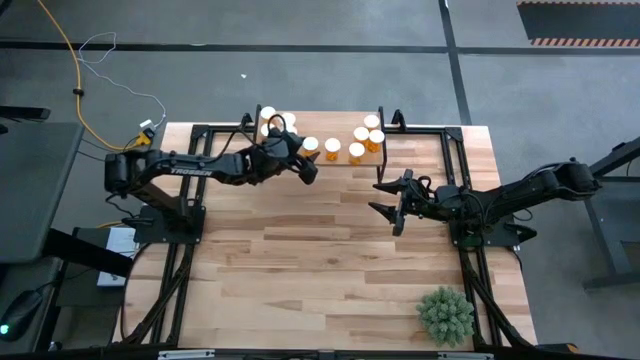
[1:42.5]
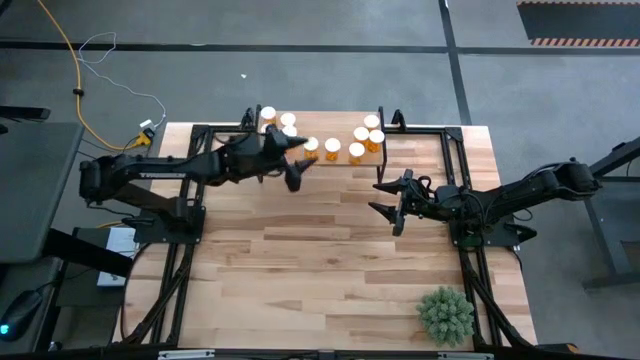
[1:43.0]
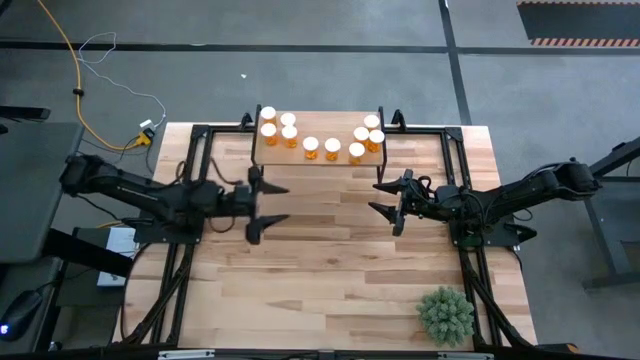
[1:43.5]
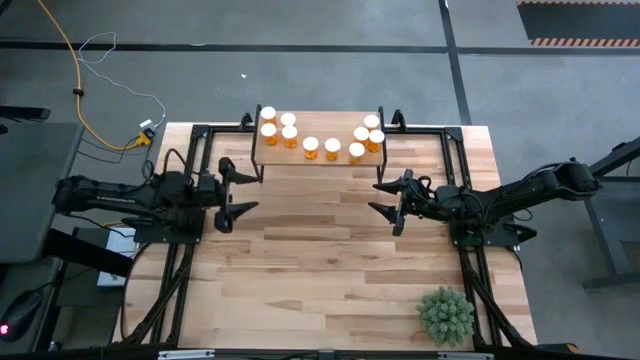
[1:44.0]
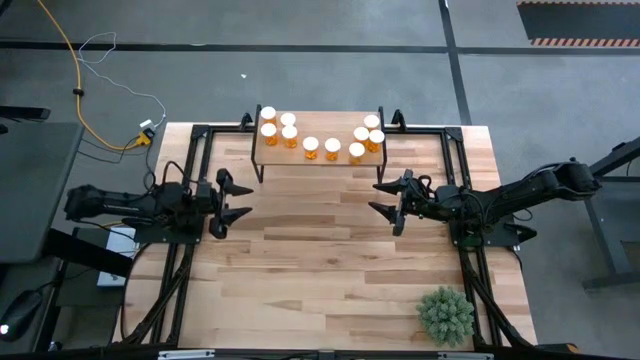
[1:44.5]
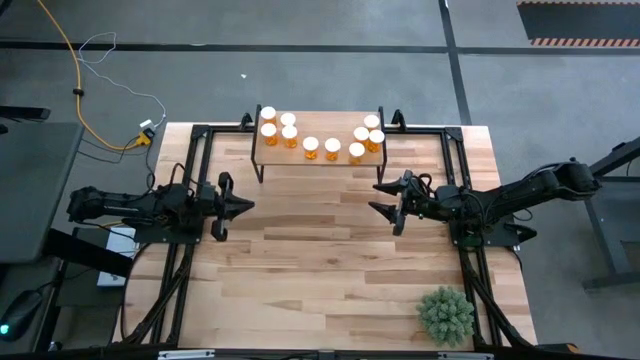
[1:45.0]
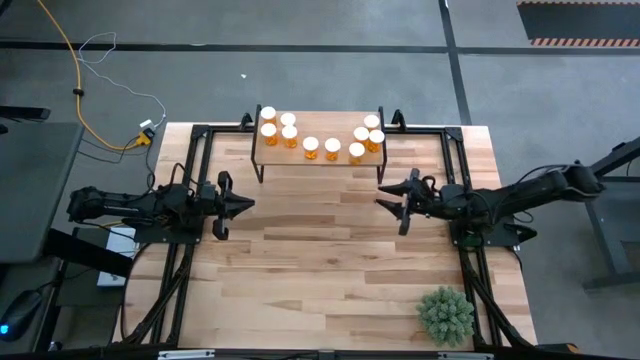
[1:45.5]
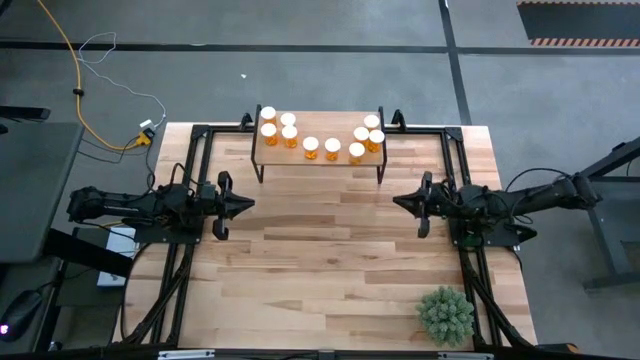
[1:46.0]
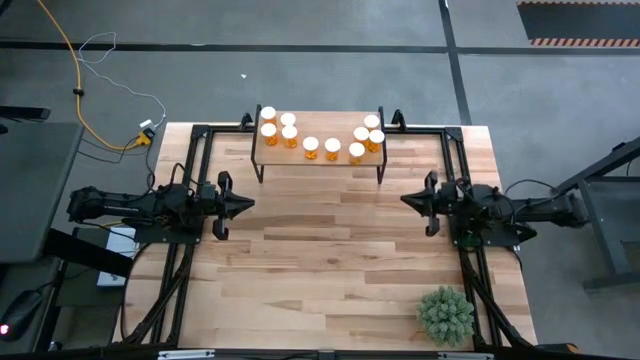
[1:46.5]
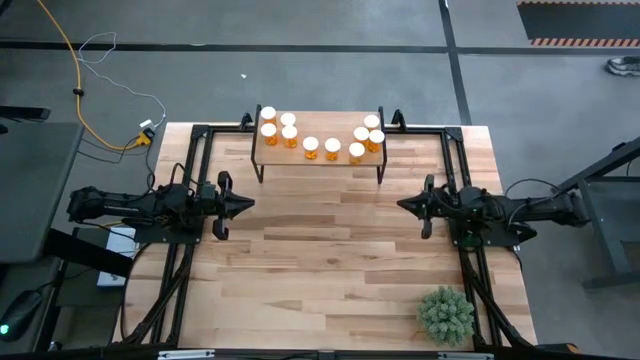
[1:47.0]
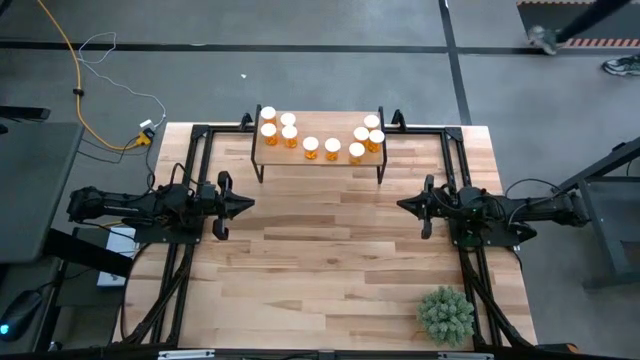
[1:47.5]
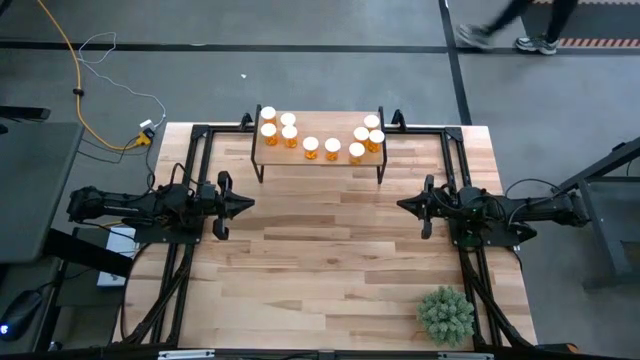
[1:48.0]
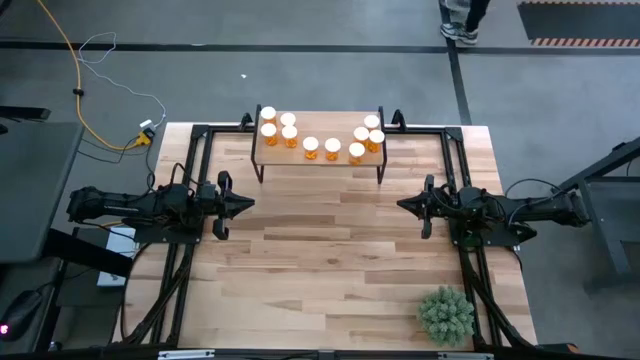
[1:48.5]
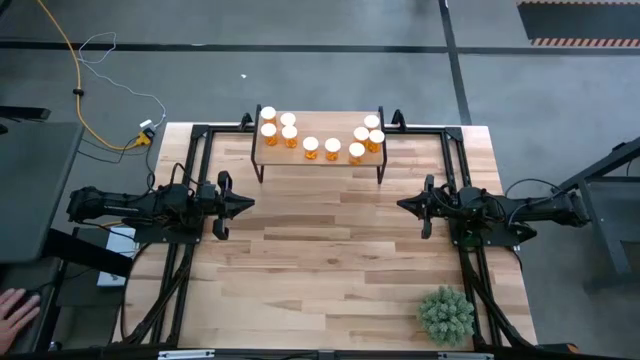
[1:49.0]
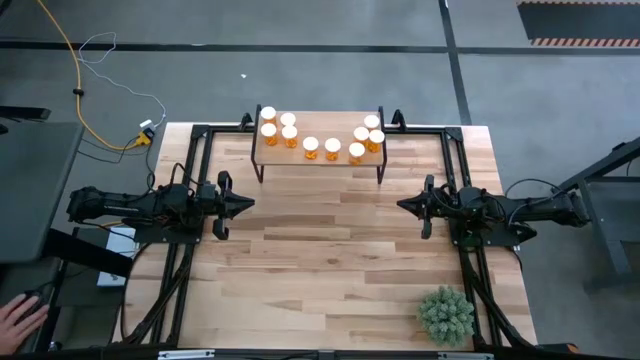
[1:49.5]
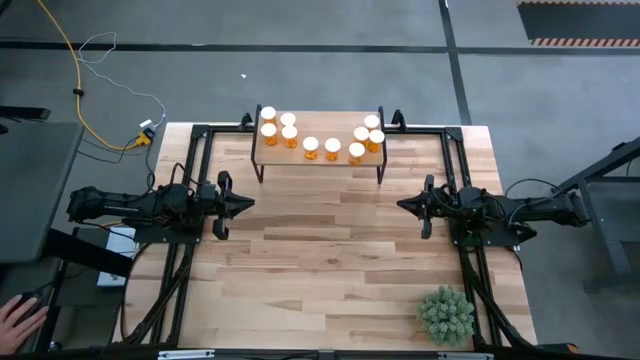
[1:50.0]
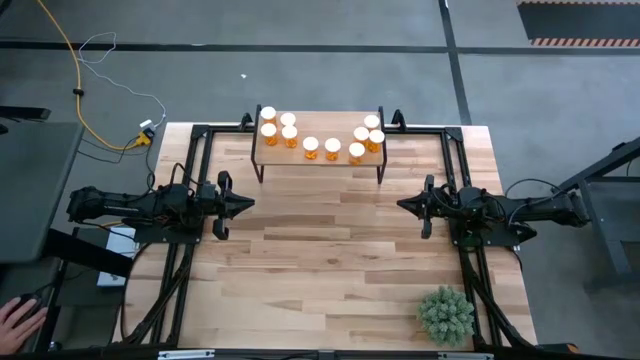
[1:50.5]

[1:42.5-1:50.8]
Task: Pick and place medicine bottles onto shelf by color
Return to Home Position

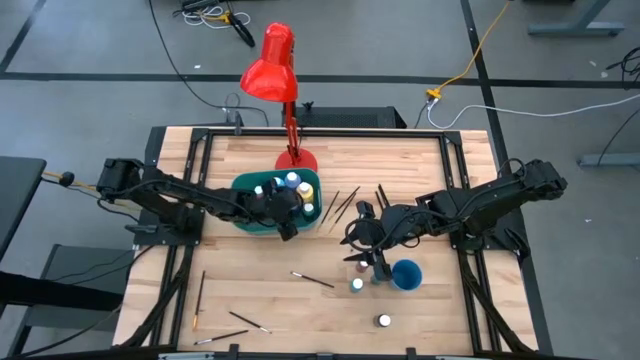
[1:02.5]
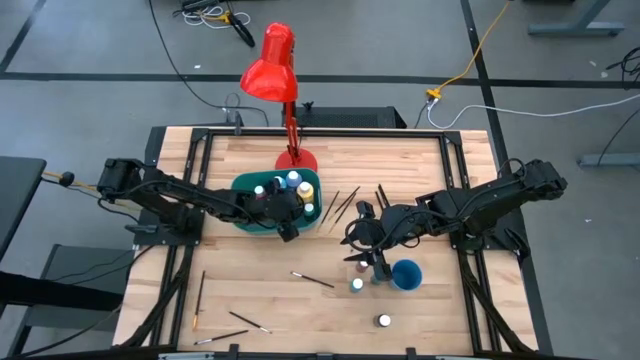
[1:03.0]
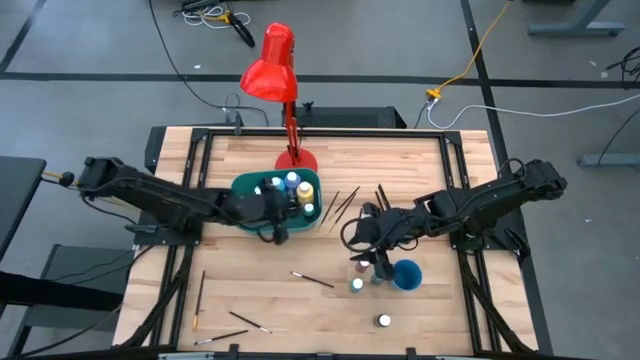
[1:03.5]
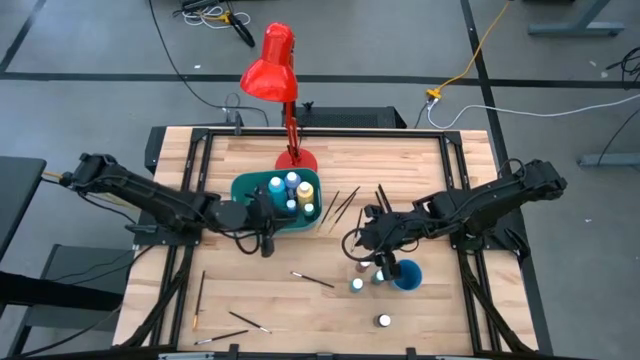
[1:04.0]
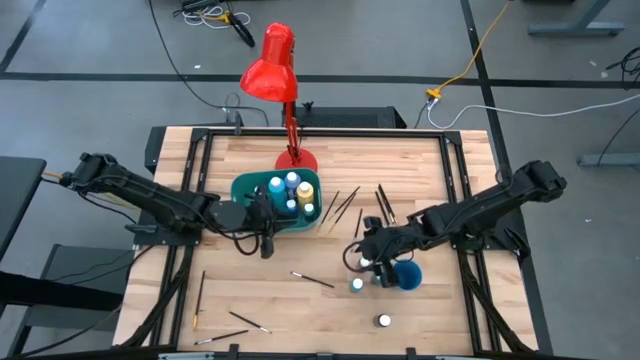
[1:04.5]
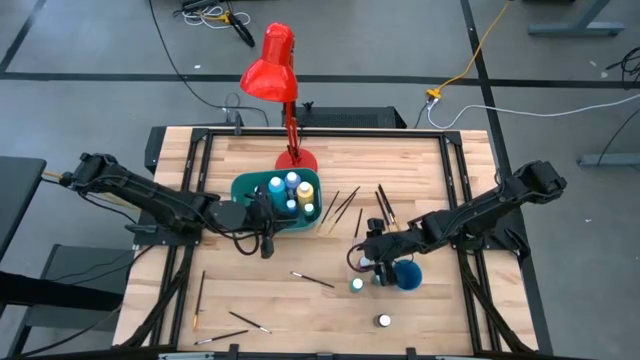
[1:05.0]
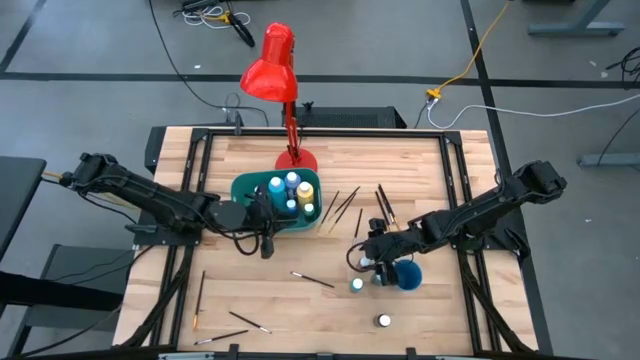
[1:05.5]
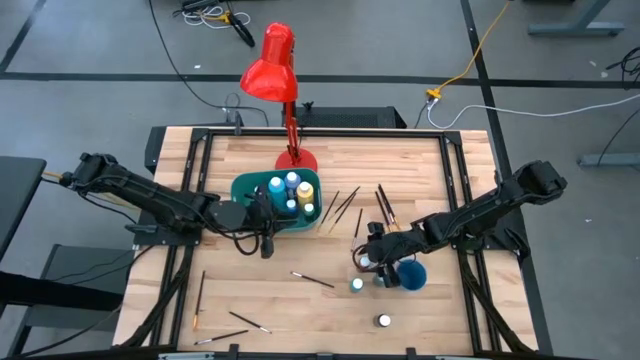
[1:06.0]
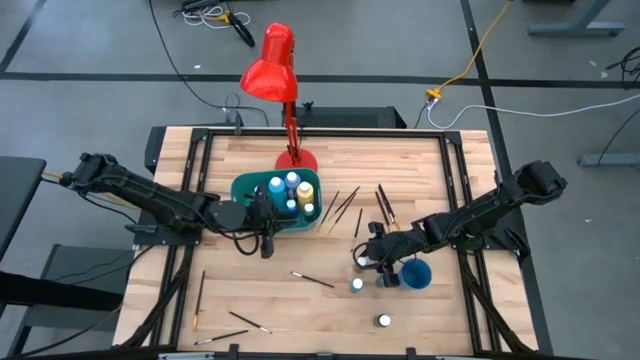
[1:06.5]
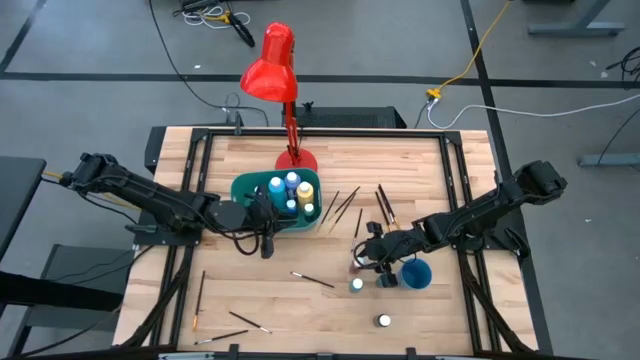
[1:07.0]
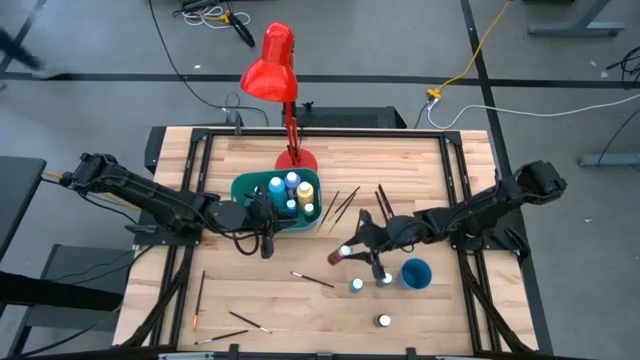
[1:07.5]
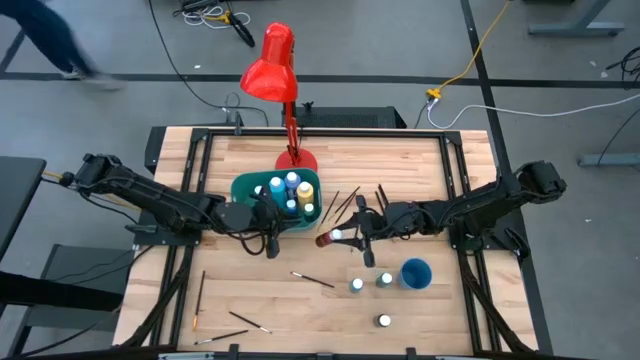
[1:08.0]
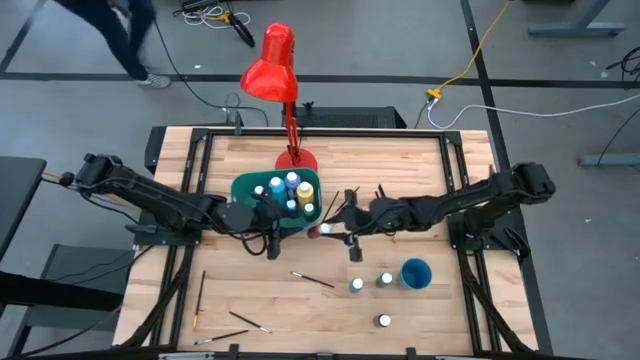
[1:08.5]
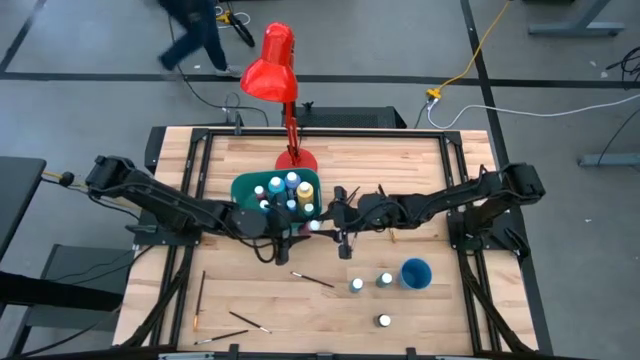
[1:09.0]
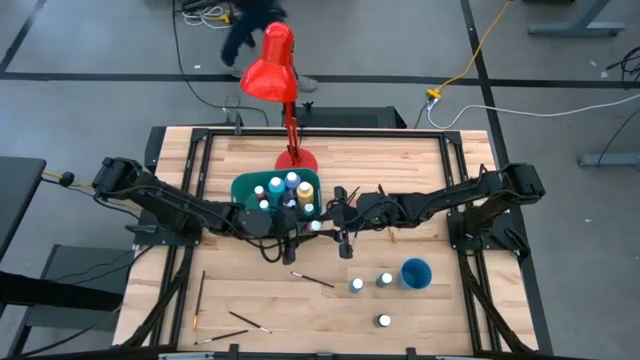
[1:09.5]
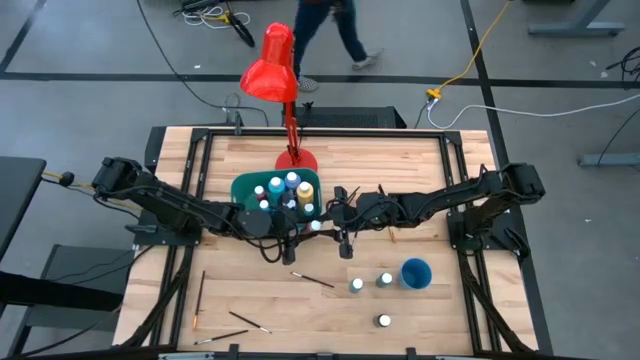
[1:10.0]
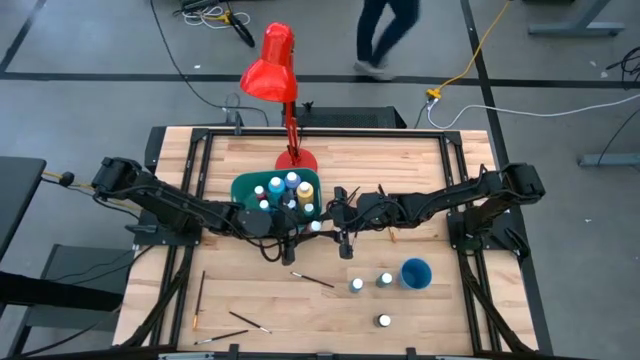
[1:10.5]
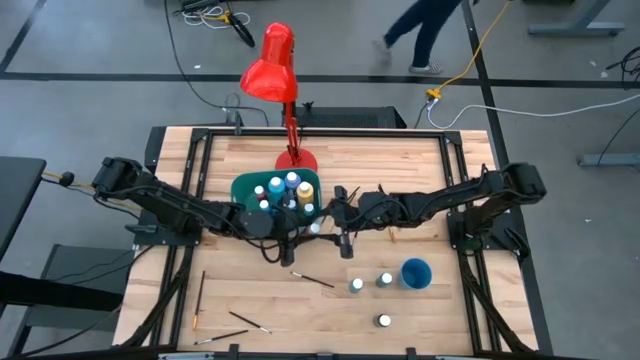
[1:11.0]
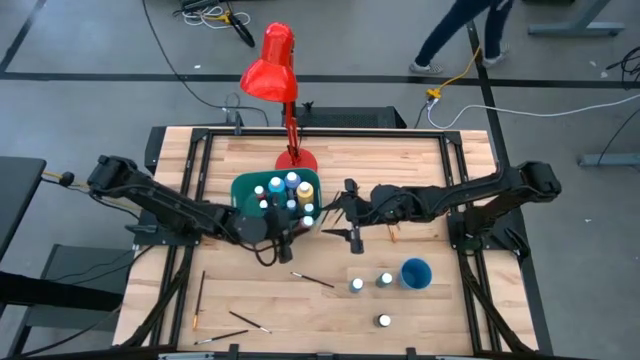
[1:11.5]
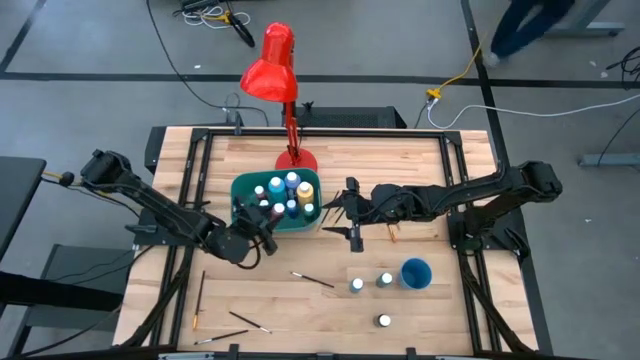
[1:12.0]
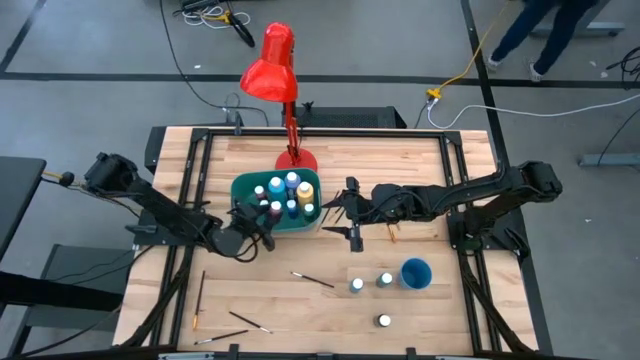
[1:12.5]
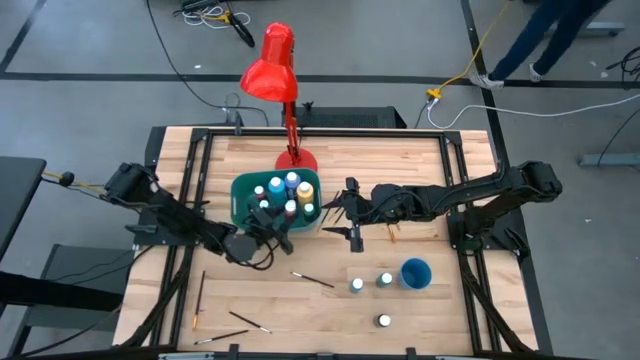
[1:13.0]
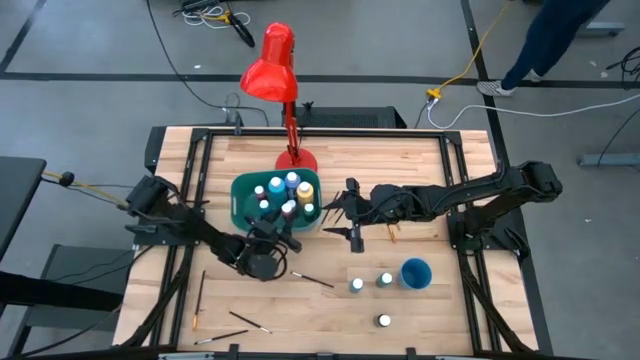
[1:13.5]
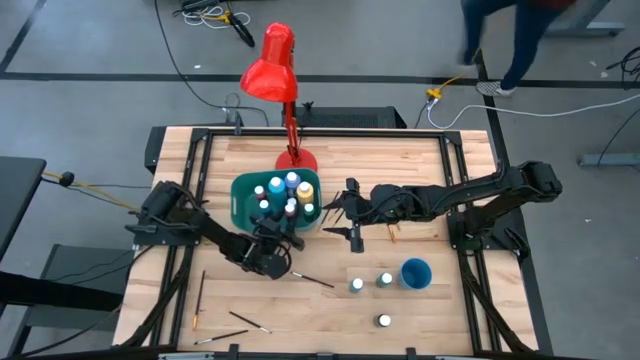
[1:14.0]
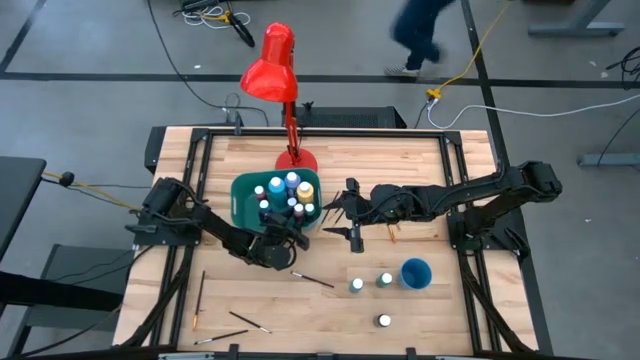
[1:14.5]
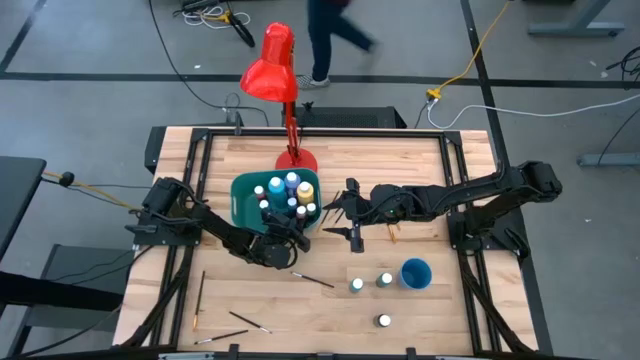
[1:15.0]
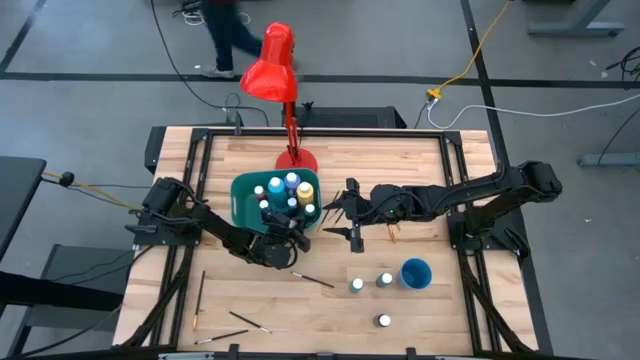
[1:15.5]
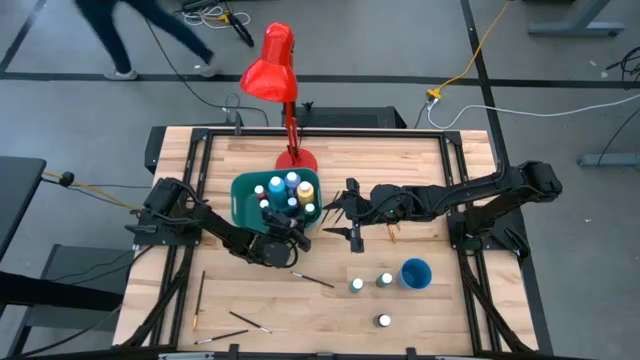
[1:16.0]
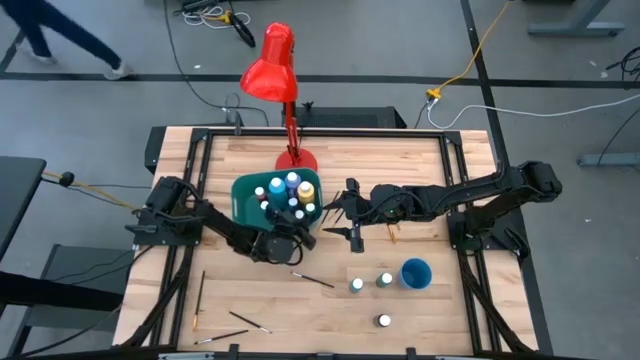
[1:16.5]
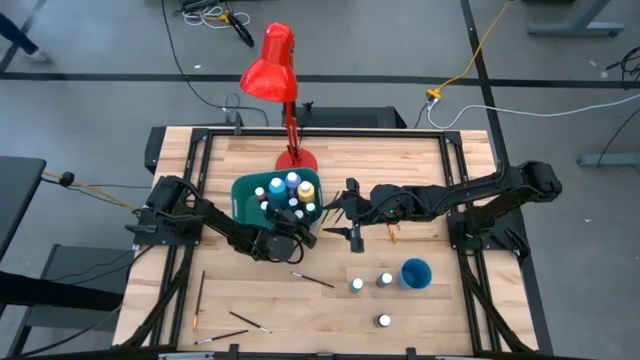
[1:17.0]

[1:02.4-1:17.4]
Task: Pick & Place Paint Supplies
Put the small red paint bottle into the green bin
